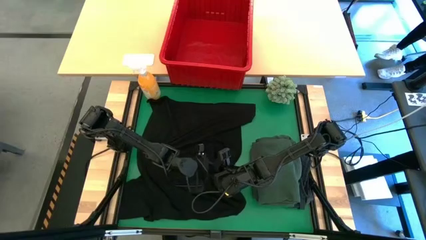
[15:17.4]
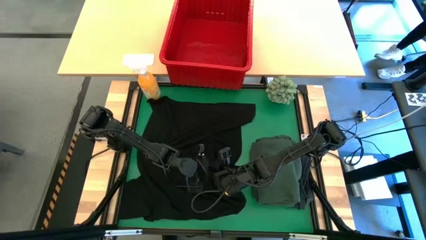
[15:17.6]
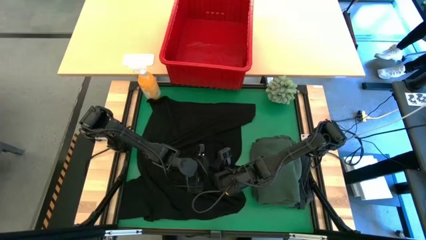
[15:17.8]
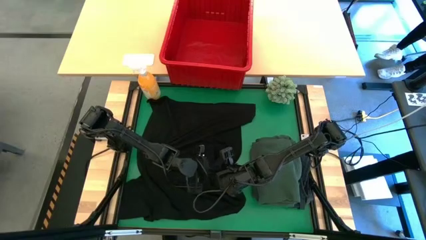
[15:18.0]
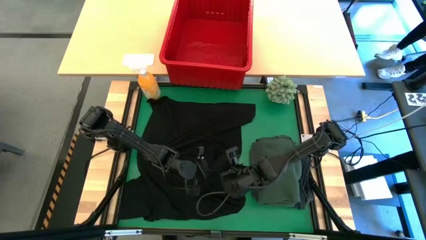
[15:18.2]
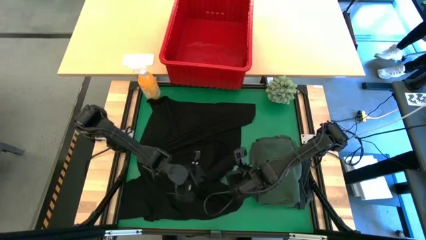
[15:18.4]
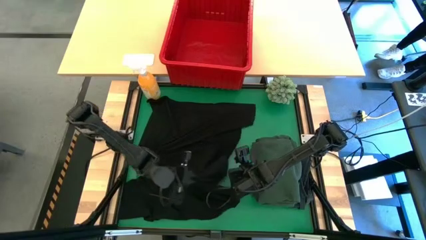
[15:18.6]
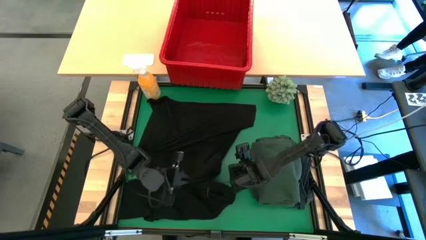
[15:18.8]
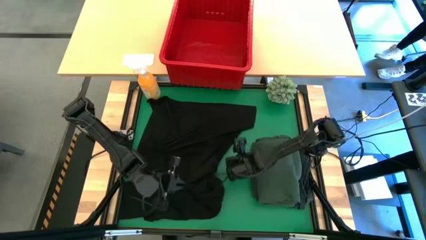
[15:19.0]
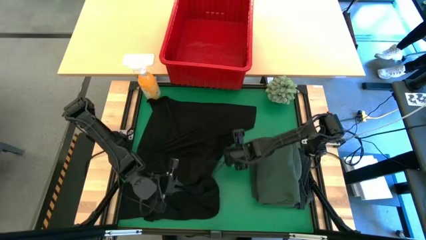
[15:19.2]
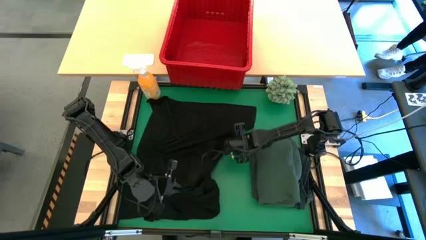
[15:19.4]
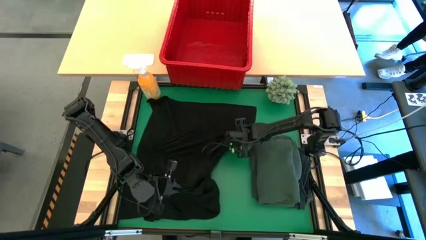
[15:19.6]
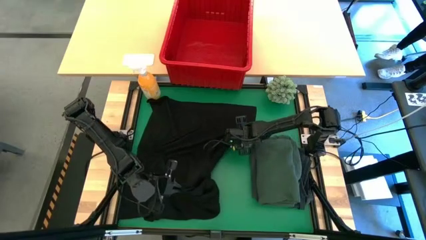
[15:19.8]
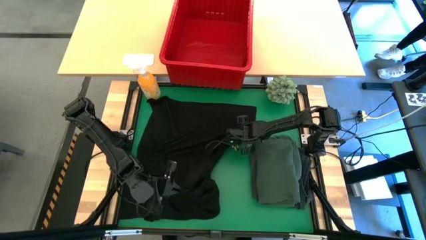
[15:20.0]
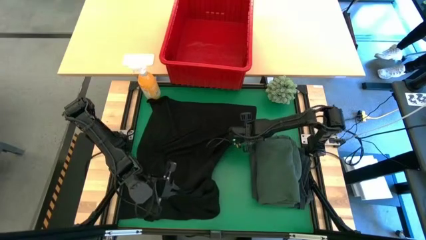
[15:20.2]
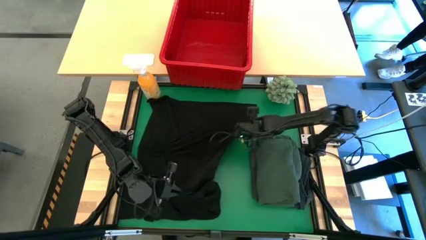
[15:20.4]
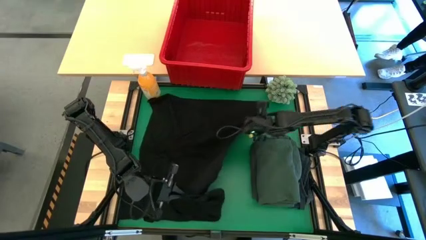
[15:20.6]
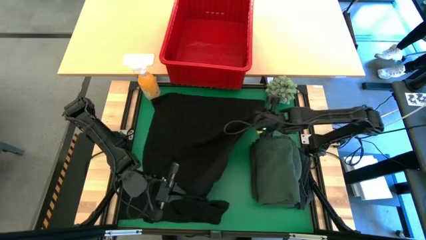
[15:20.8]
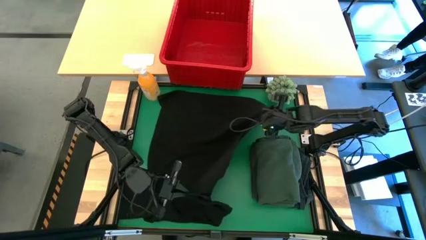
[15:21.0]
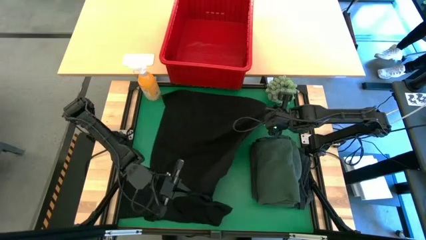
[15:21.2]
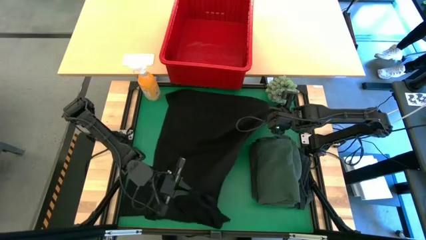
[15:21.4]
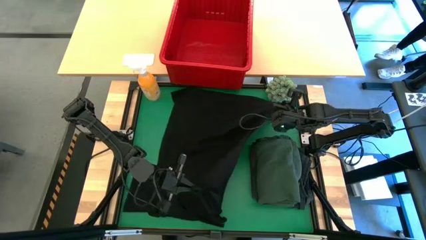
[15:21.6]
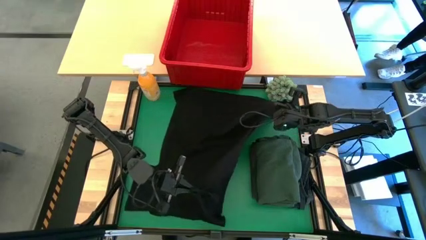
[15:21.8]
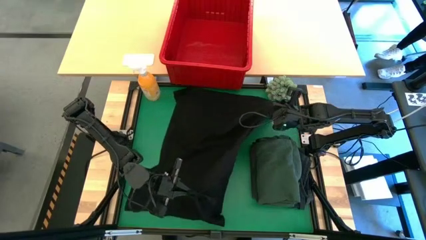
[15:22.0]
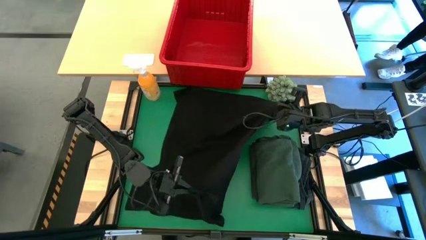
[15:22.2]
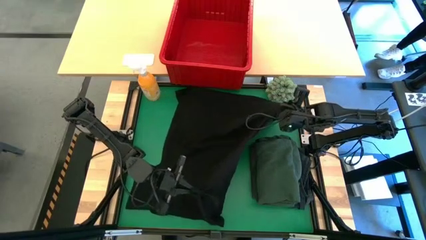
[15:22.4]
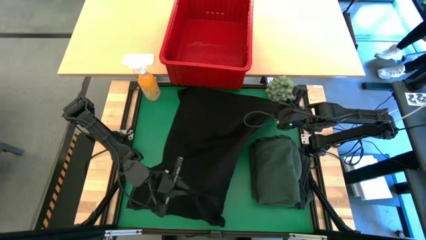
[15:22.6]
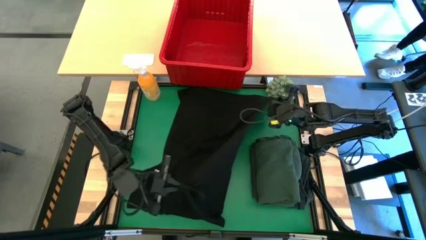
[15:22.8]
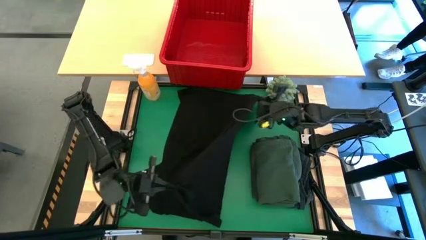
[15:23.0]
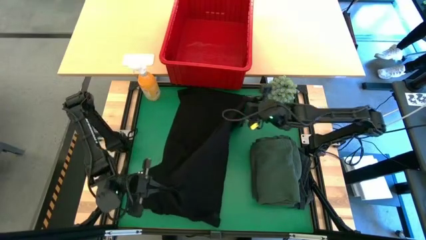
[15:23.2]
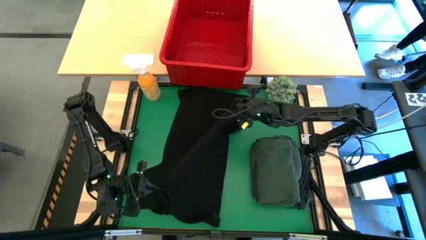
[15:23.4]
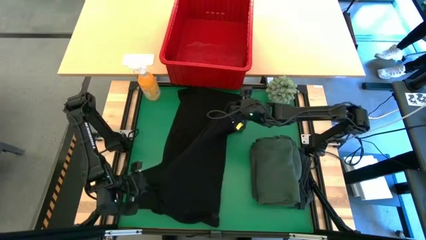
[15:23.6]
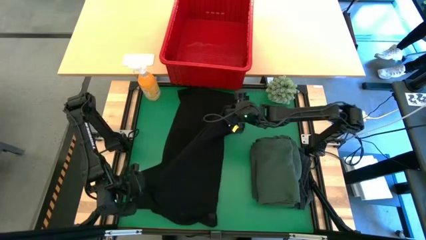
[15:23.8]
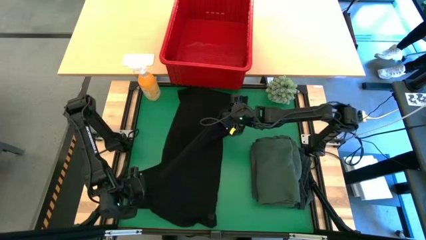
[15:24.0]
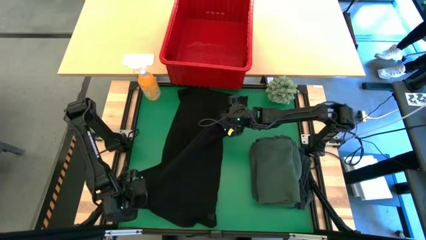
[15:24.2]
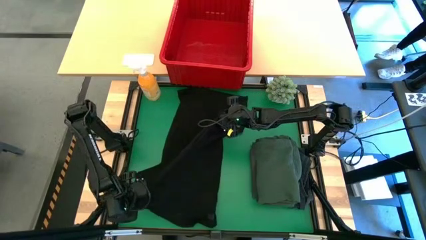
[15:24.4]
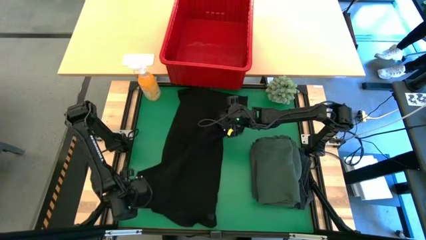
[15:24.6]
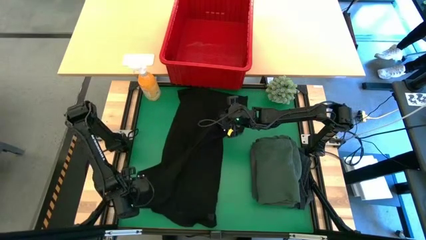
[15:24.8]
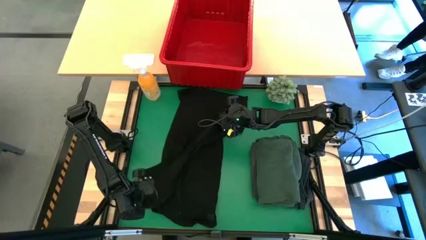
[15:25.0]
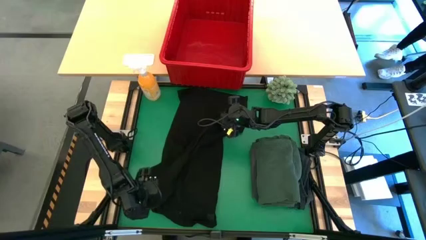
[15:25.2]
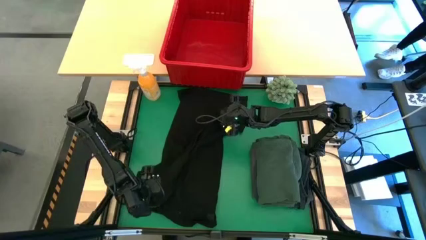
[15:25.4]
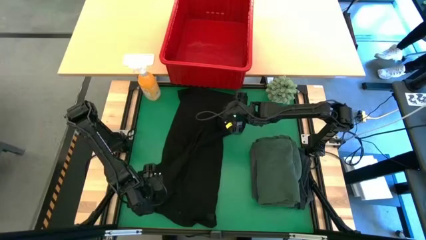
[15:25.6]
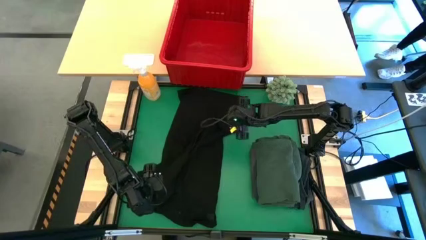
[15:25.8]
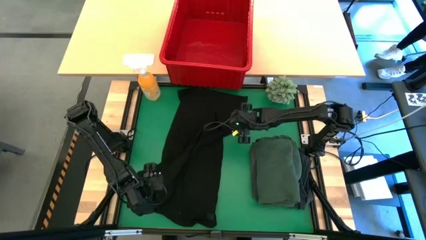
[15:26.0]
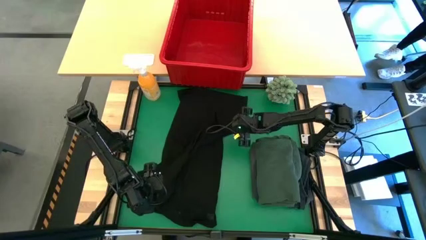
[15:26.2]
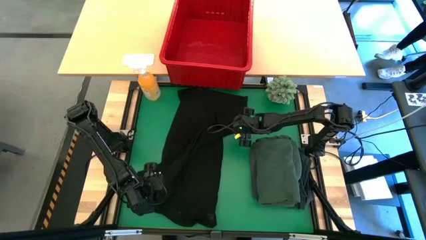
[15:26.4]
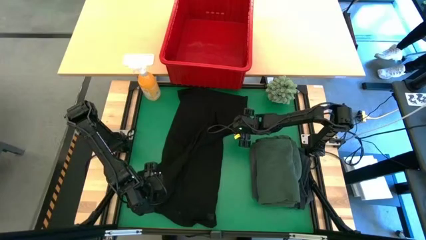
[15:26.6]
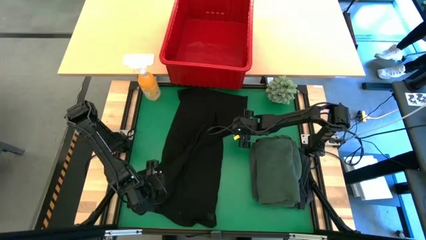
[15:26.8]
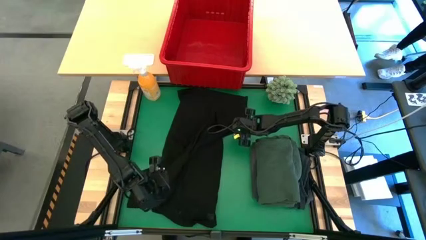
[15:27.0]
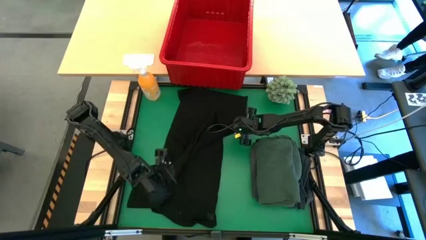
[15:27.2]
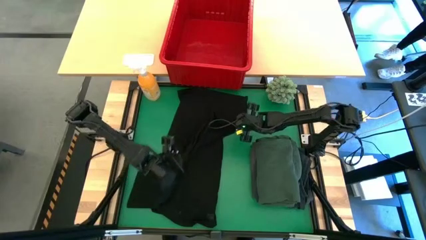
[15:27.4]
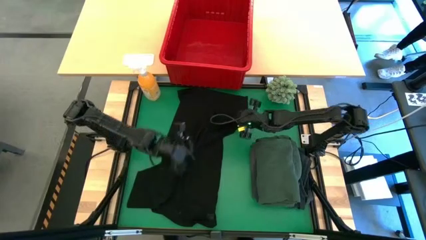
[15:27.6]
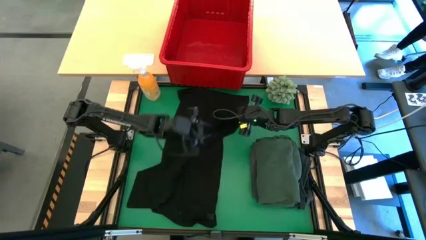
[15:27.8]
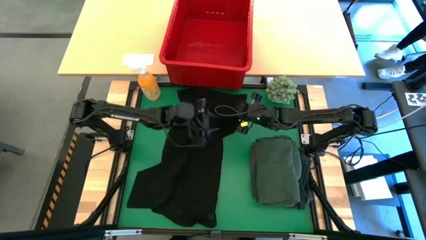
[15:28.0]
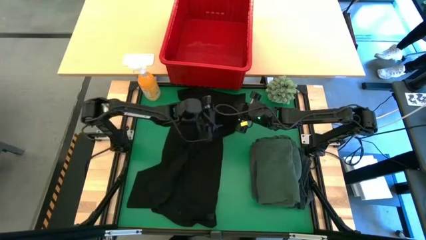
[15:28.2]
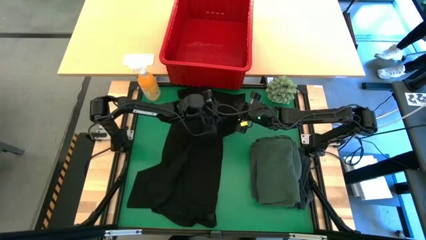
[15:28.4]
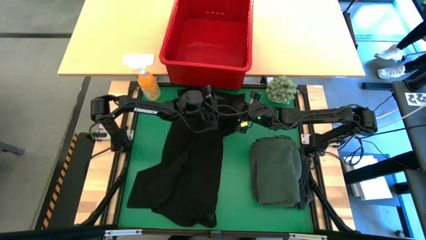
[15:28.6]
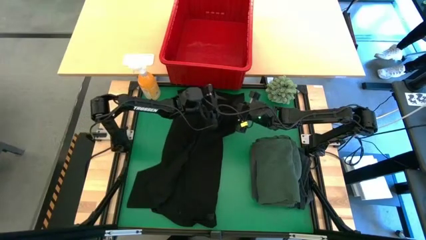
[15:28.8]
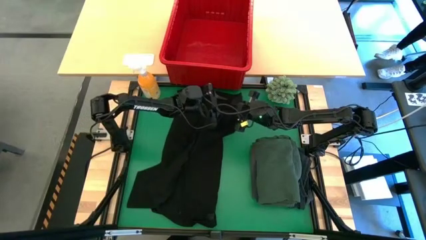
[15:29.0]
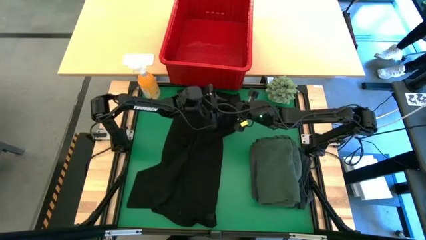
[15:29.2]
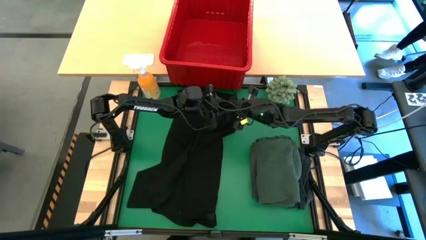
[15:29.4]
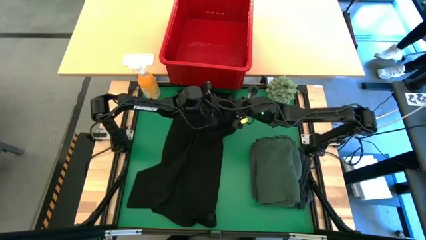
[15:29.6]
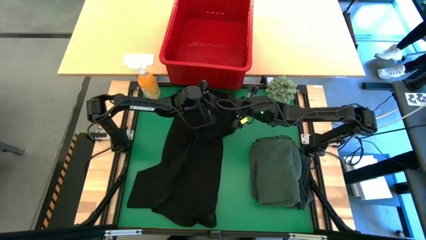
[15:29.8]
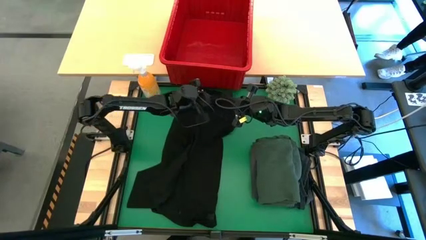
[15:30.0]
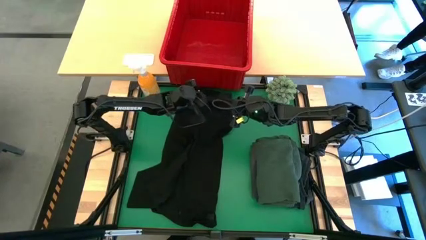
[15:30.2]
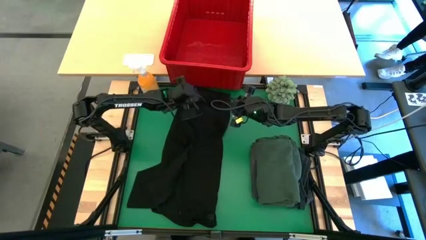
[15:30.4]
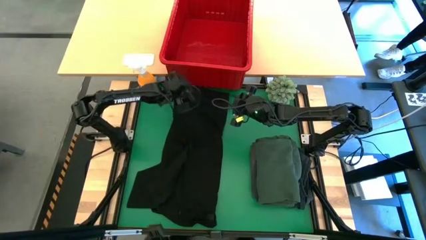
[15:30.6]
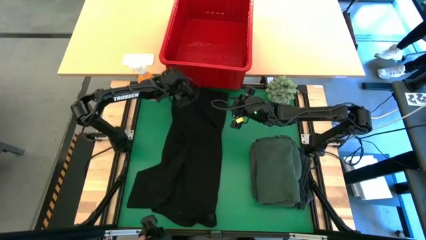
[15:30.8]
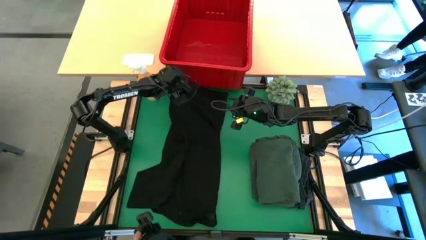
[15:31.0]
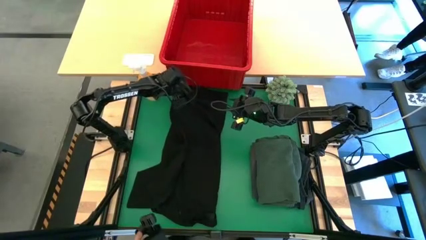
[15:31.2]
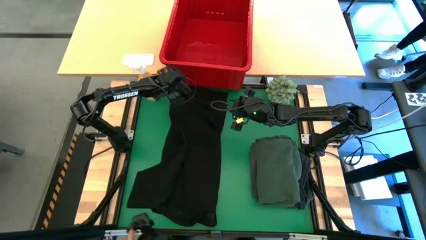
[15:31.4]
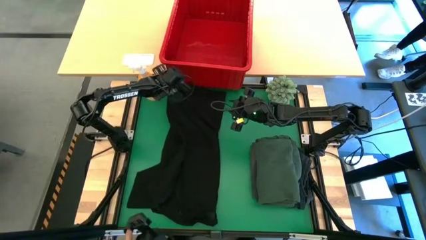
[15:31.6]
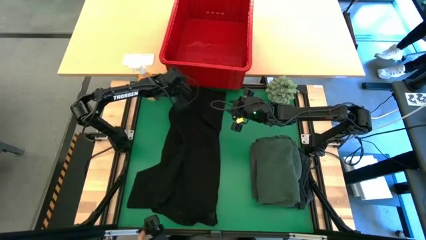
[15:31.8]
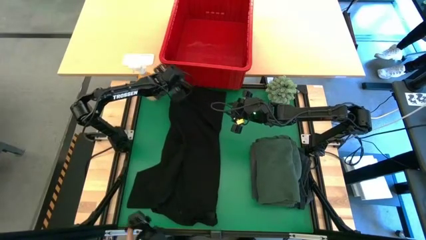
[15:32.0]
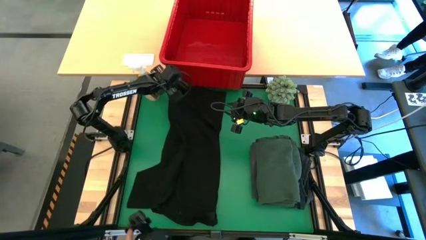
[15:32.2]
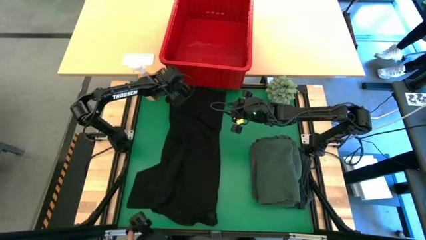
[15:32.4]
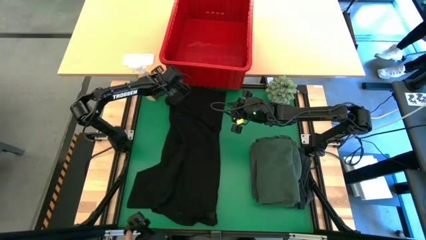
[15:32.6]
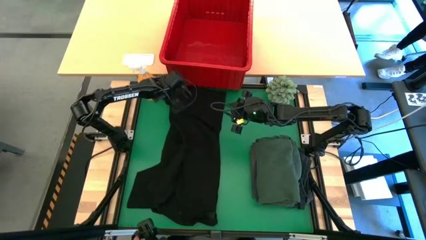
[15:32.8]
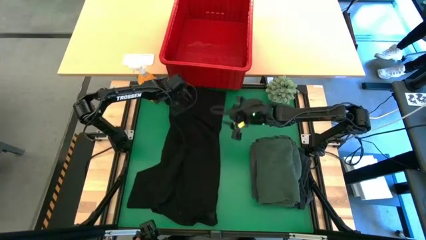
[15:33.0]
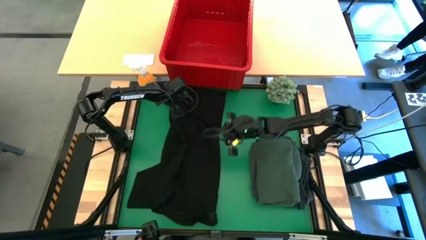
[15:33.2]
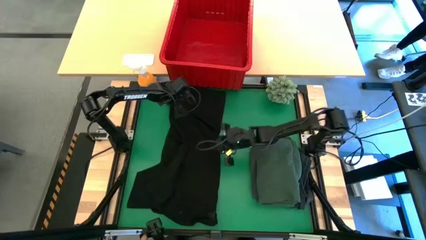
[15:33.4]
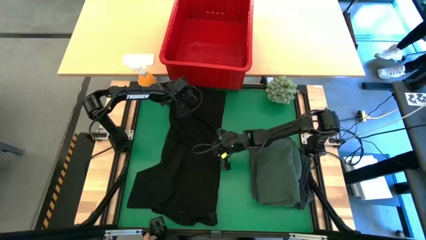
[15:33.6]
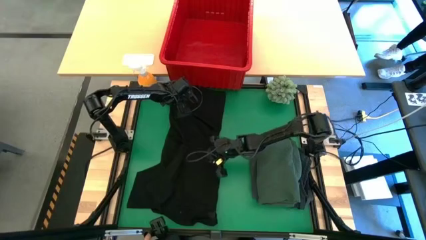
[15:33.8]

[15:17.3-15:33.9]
Task: Fold Laundry from Bin
Fold the black shirt
